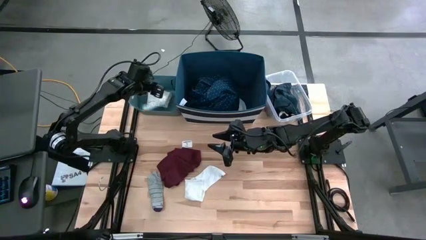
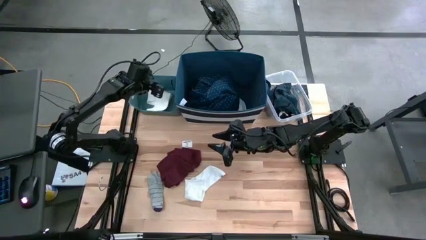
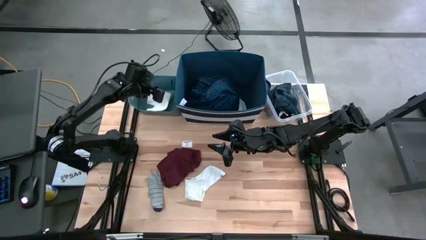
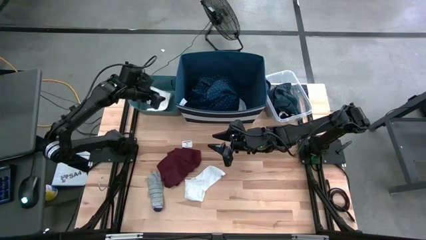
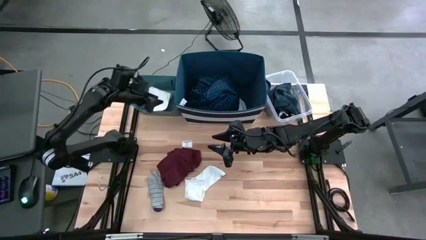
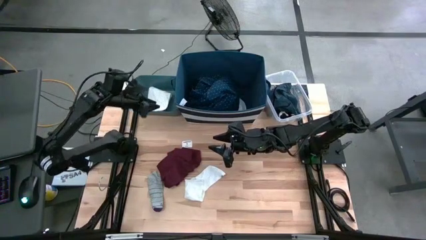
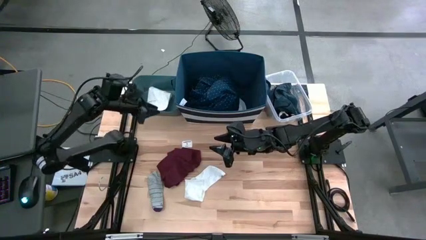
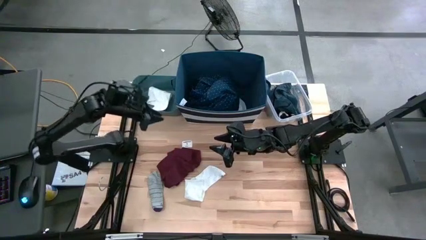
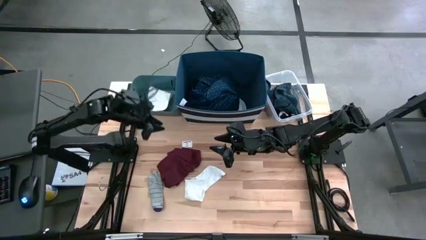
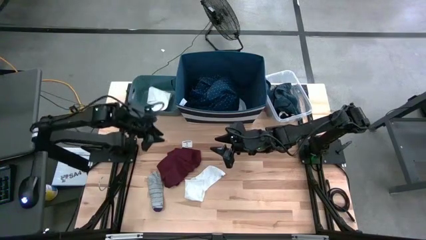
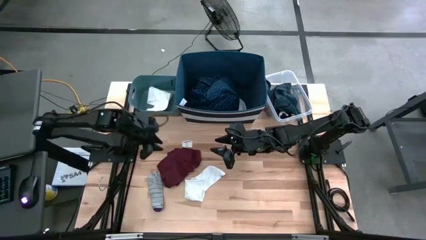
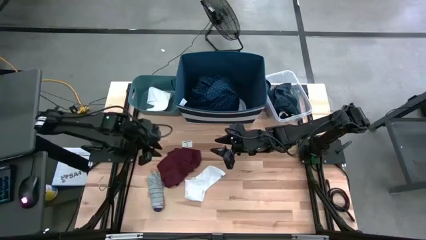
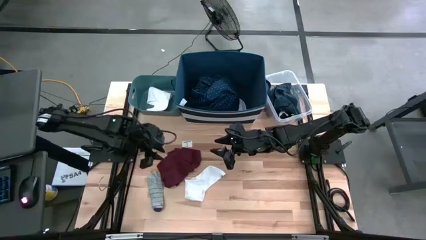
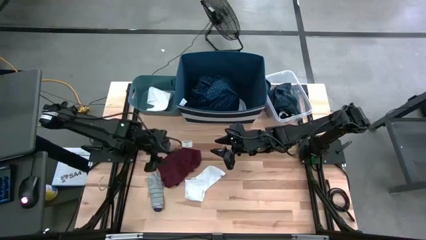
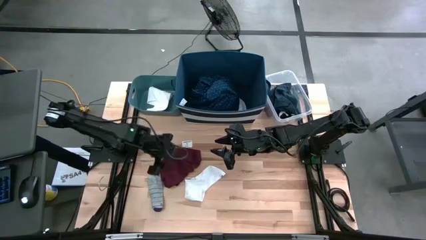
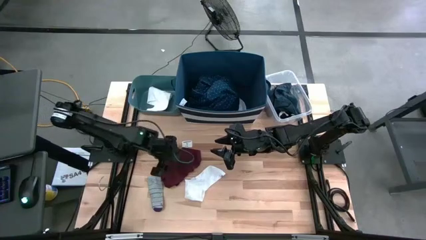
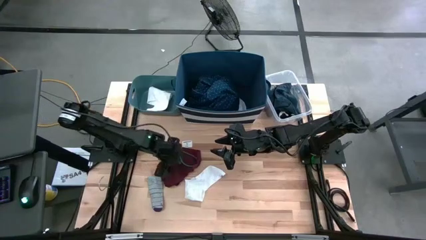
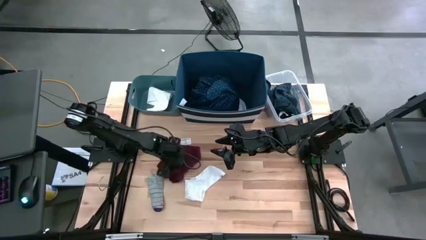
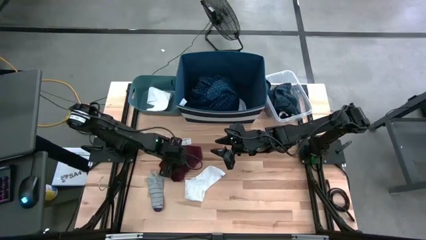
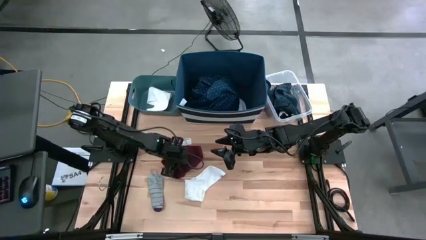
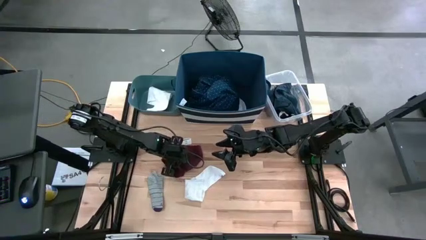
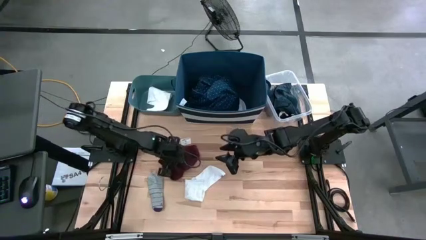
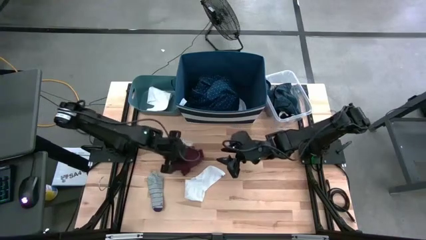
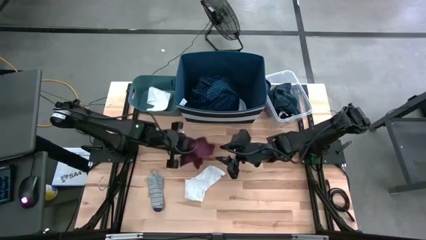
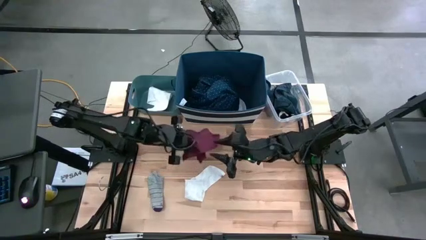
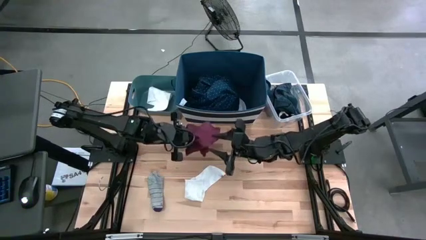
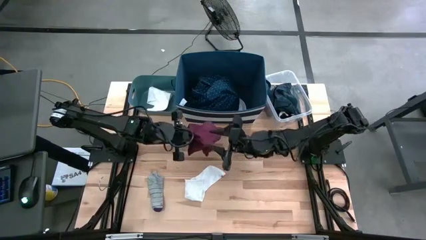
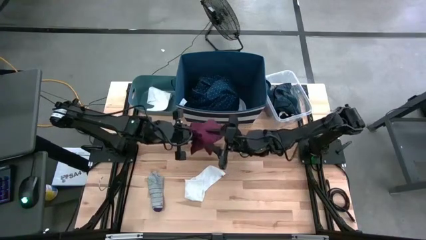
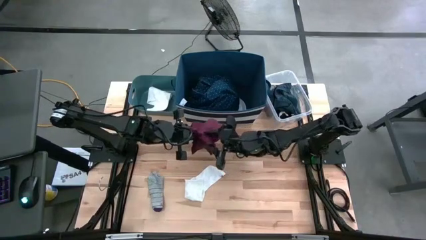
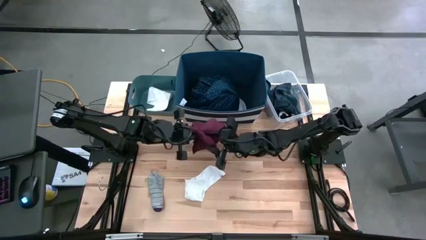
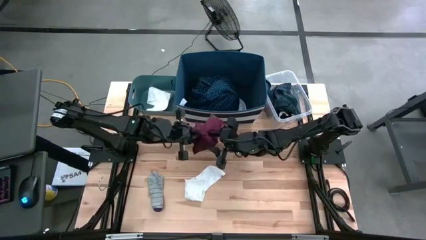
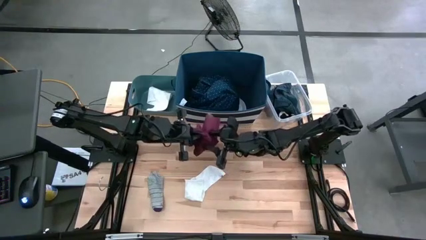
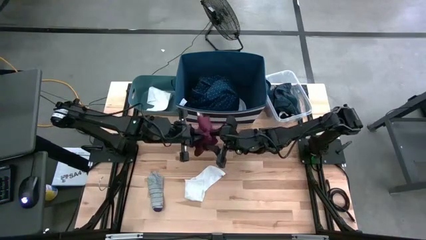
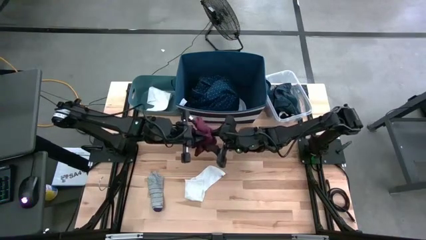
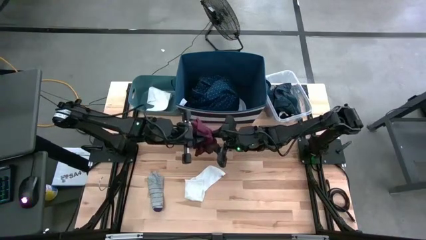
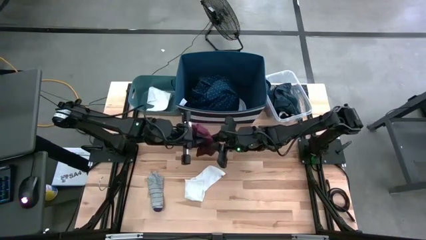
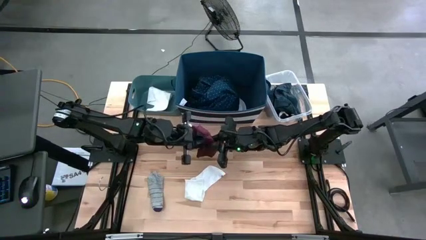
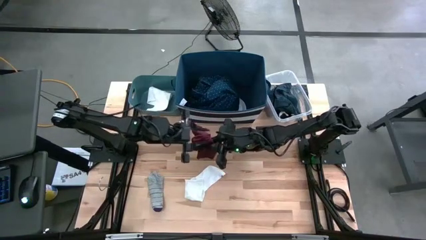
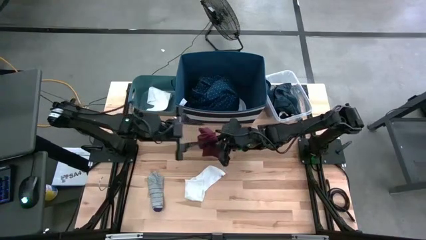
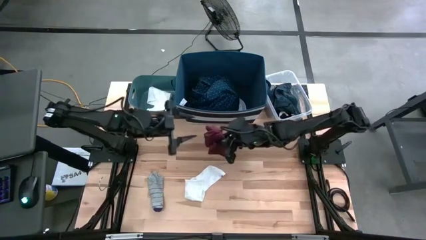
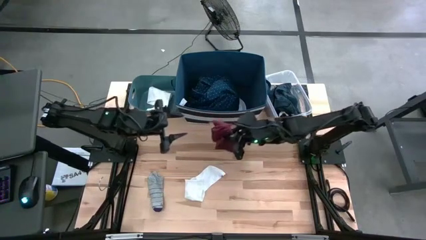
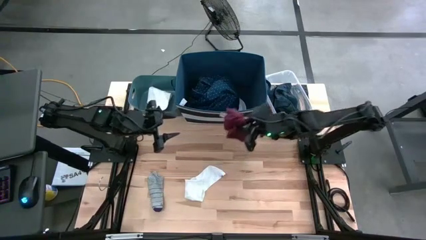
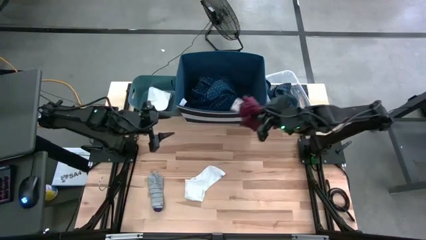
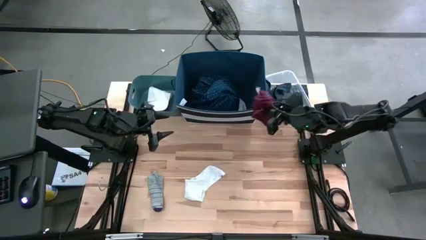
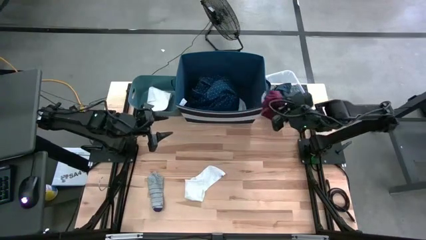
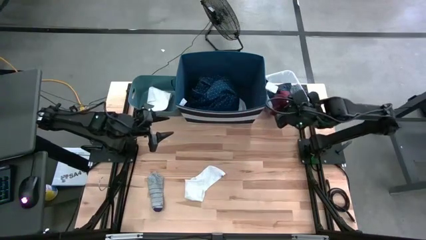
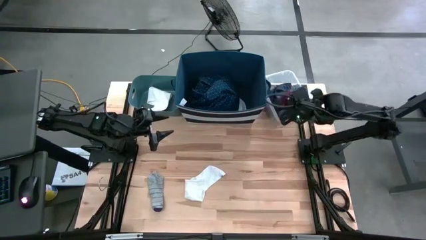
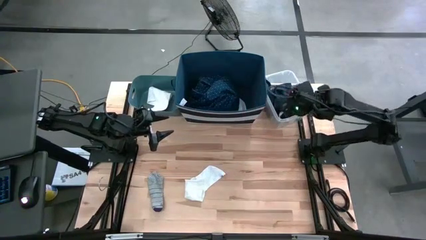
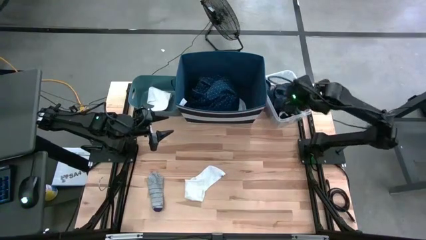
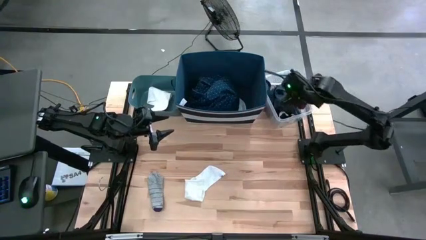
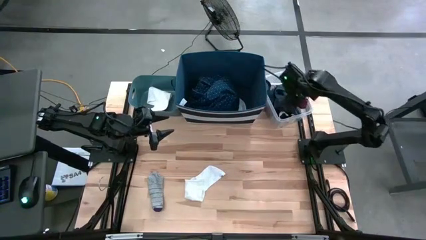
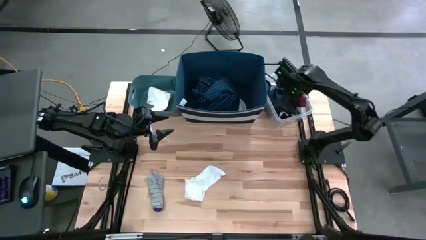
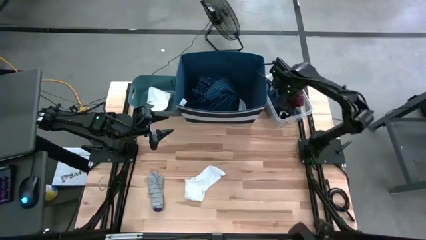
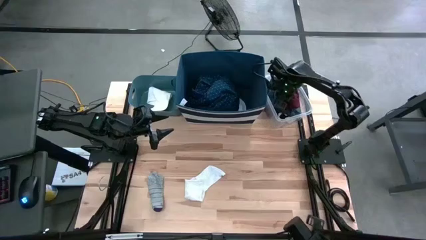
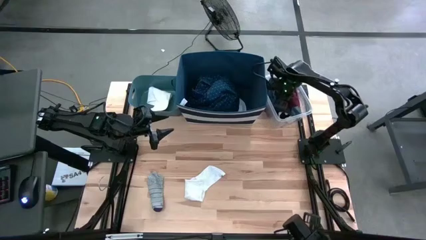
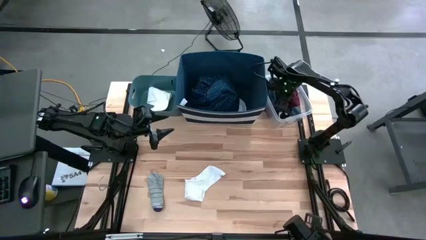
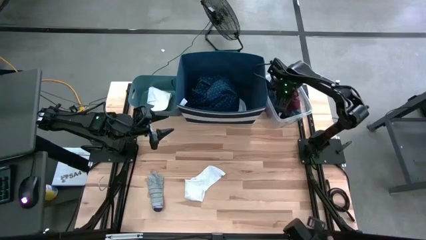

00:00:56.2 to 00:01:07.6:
Task: Pick & Place Cloths
Put the red underwear into the transparent bin

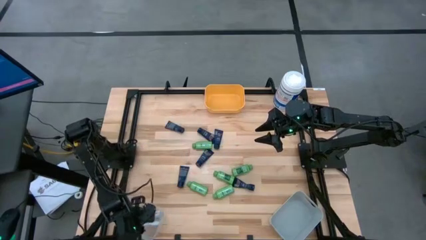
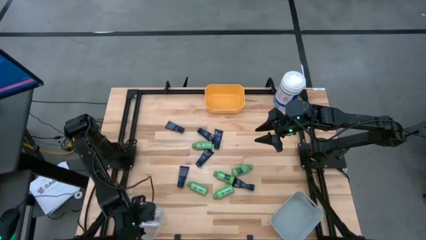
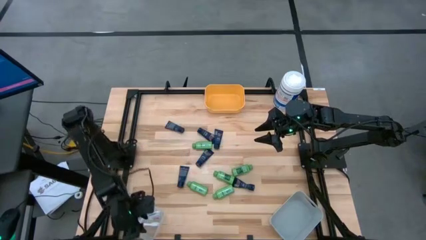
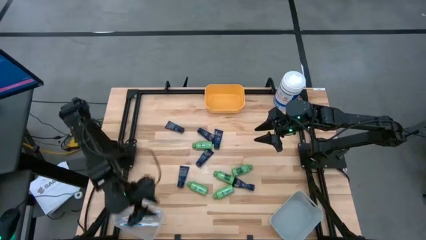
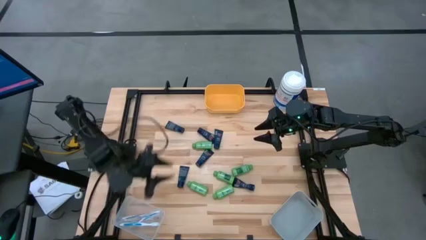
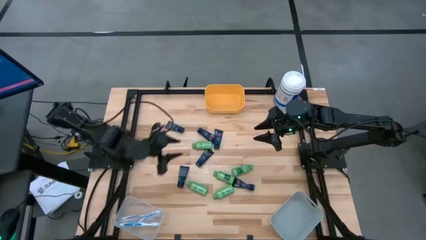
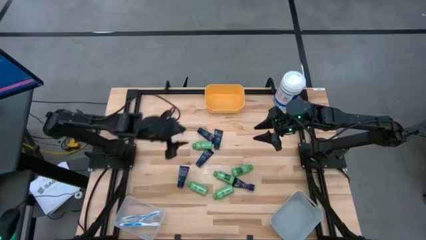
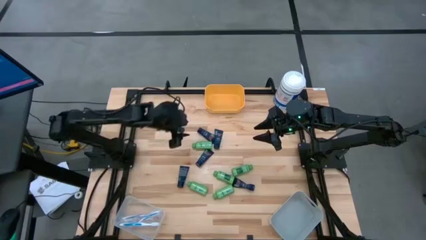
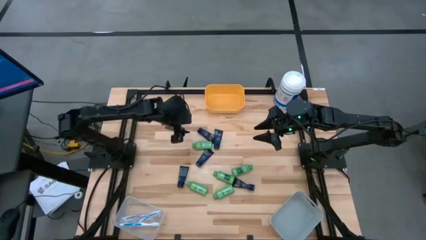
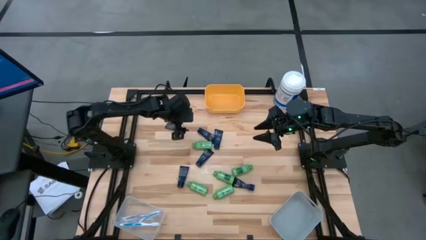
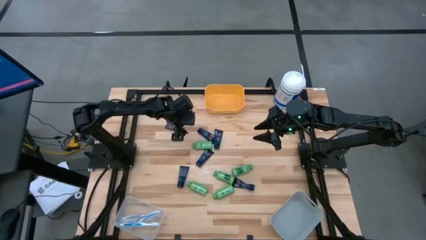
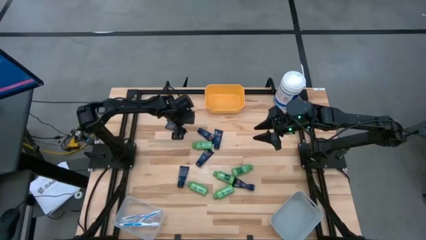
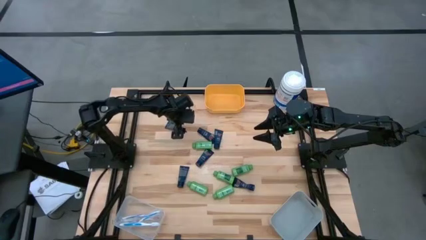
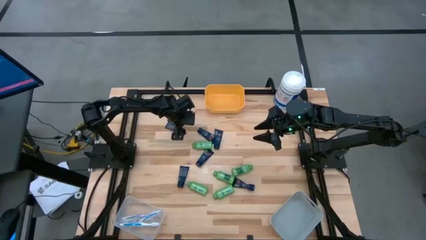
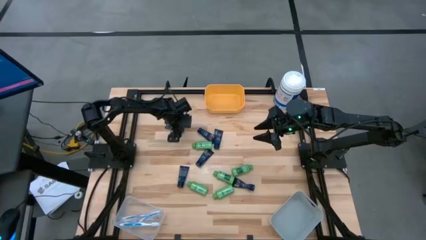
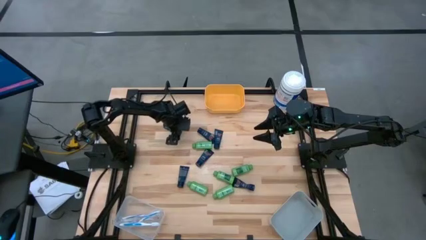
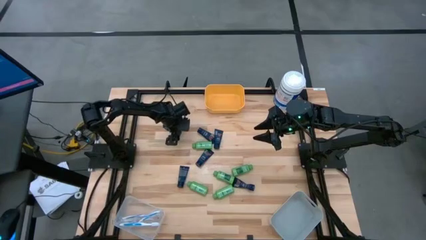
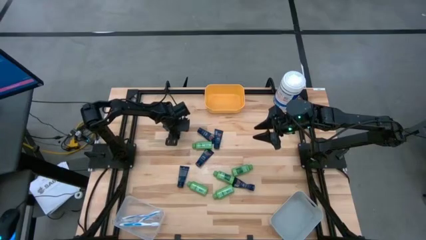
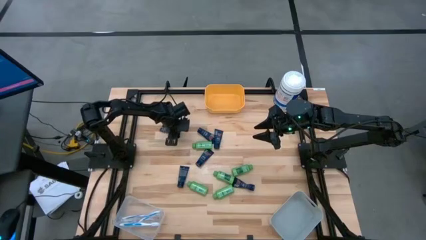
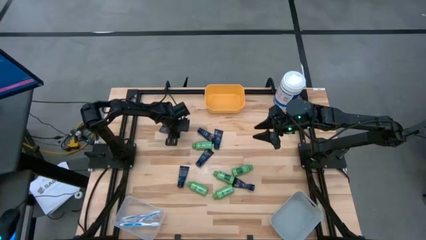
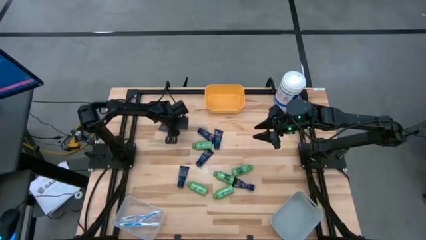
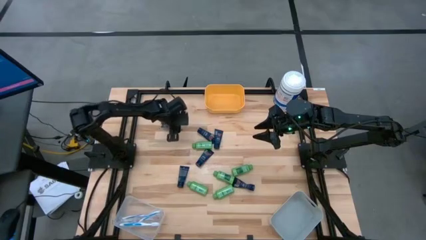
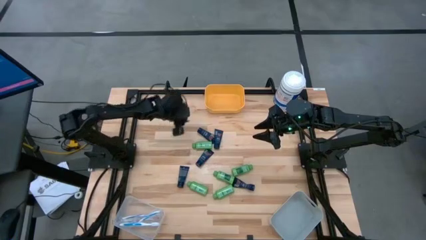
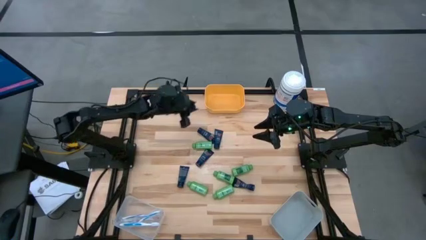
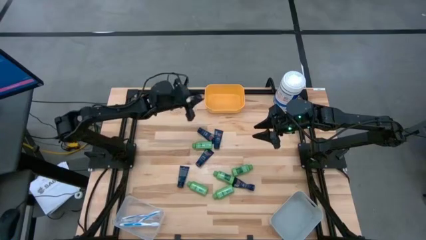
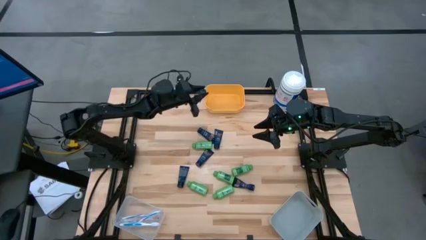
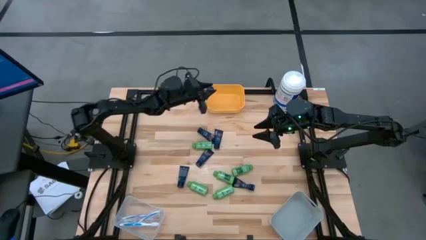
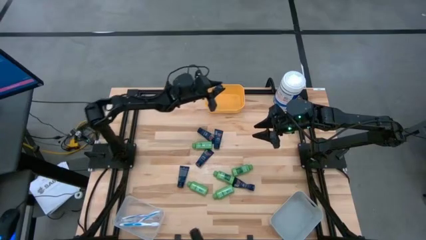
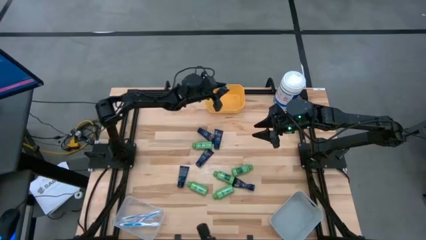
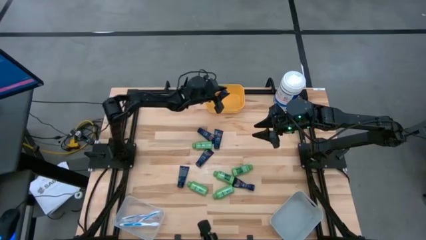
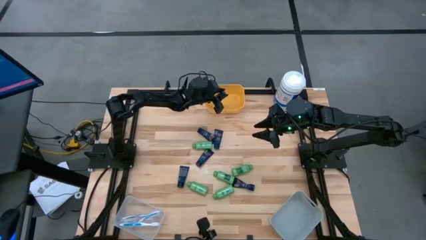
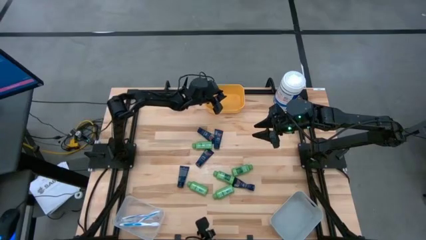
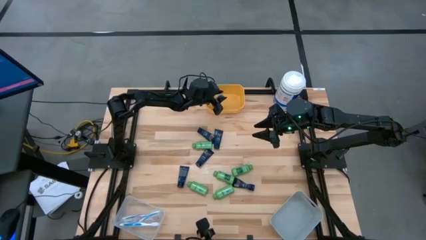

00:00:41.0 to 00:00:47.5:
Task: Pick & Place Travel size toiletries
Put the shave cream into the yellow bin
